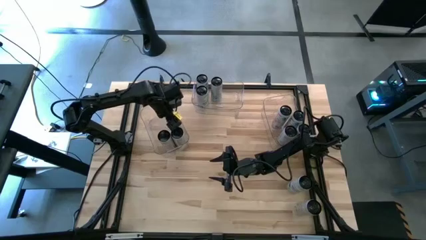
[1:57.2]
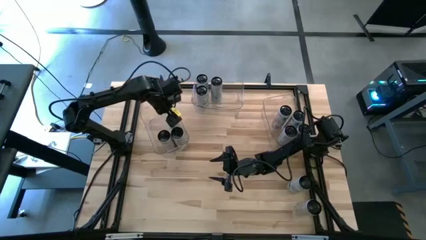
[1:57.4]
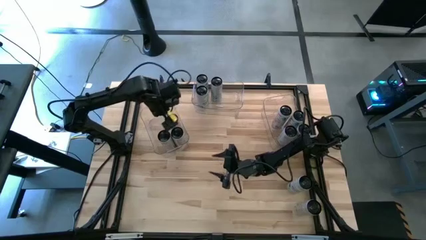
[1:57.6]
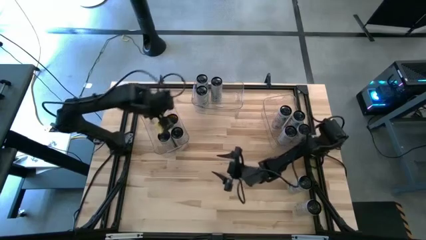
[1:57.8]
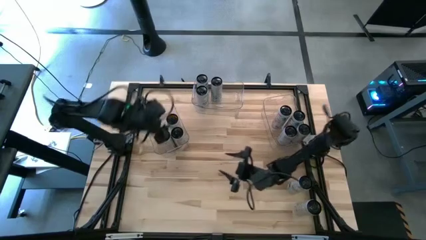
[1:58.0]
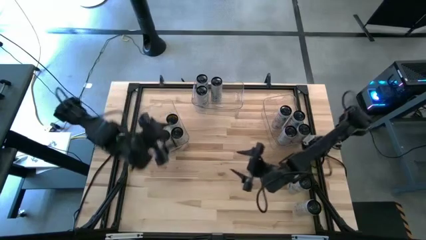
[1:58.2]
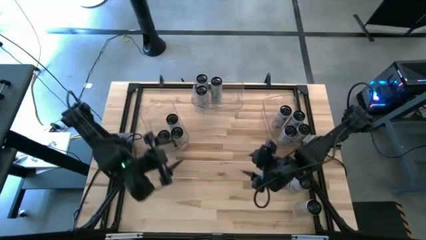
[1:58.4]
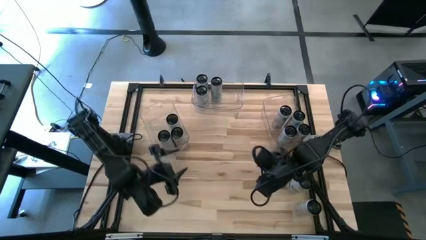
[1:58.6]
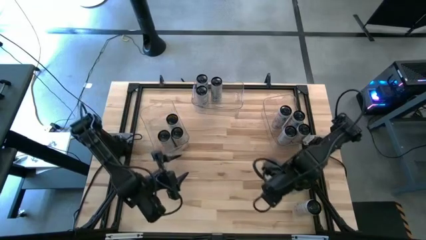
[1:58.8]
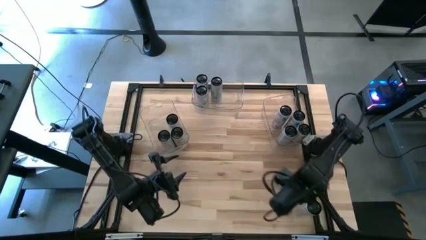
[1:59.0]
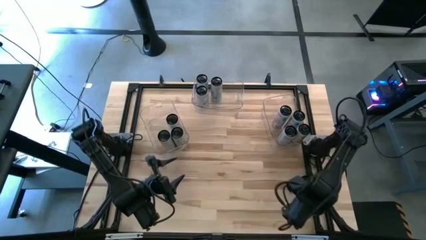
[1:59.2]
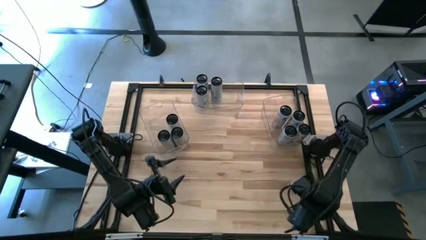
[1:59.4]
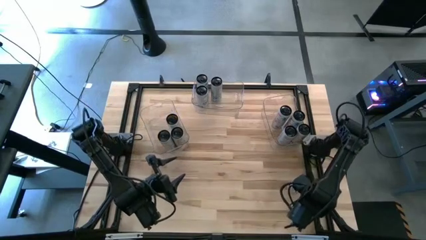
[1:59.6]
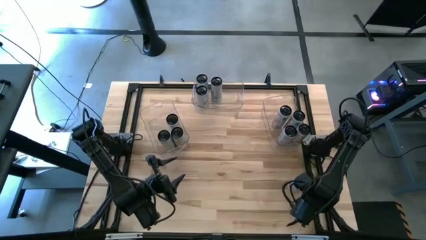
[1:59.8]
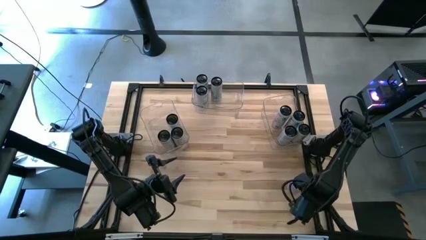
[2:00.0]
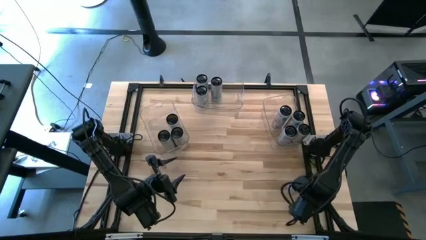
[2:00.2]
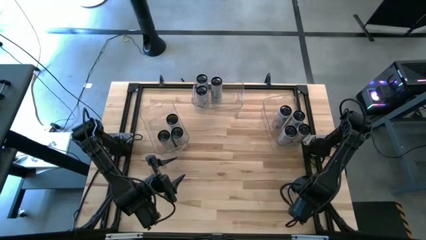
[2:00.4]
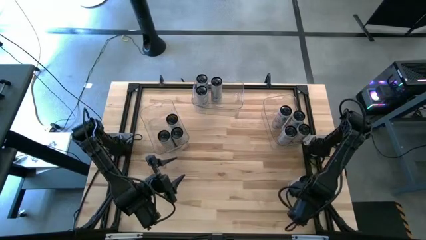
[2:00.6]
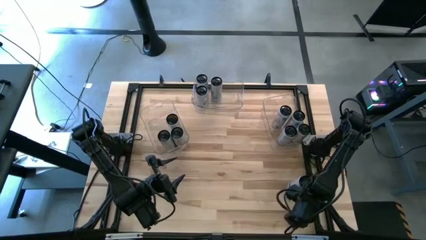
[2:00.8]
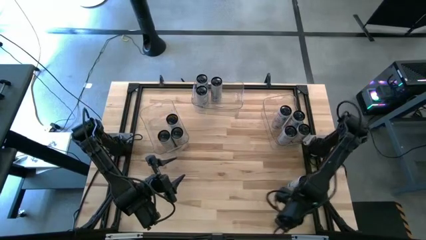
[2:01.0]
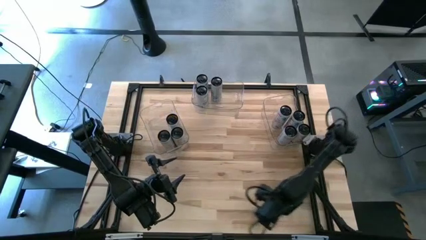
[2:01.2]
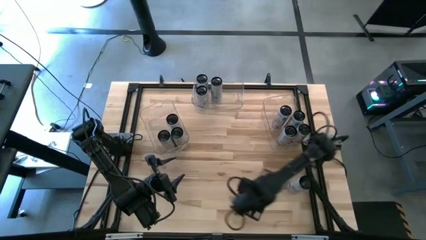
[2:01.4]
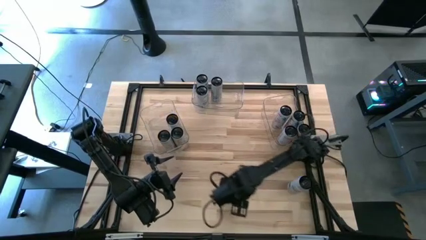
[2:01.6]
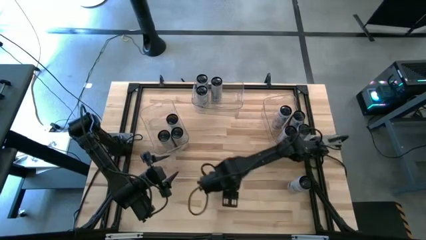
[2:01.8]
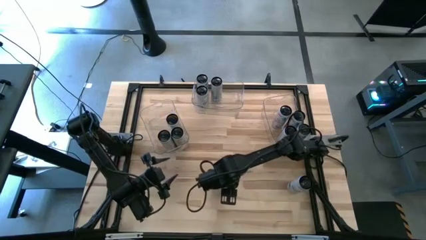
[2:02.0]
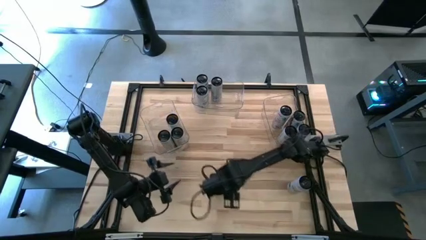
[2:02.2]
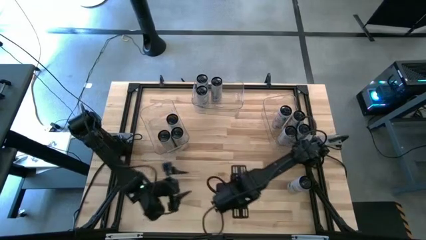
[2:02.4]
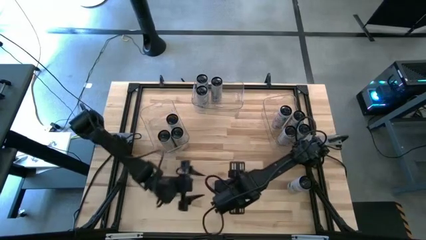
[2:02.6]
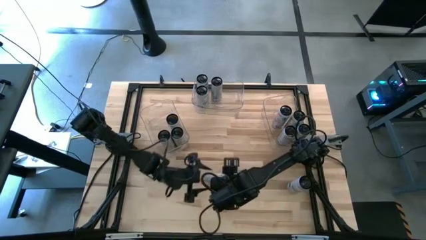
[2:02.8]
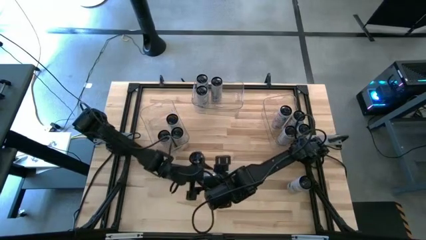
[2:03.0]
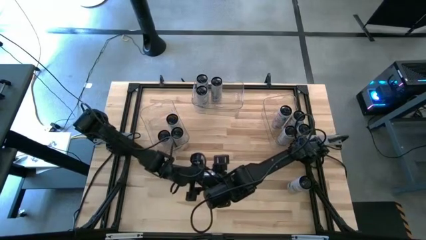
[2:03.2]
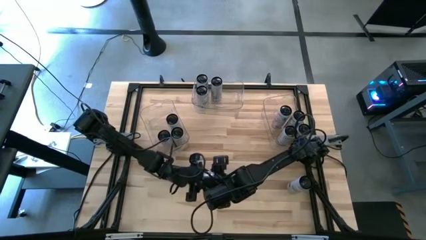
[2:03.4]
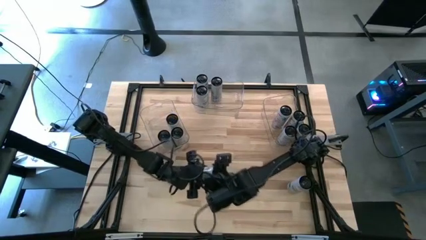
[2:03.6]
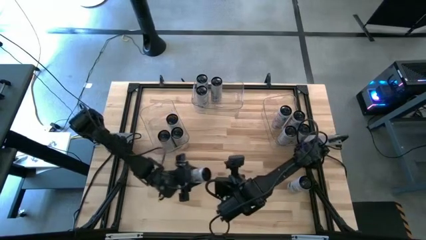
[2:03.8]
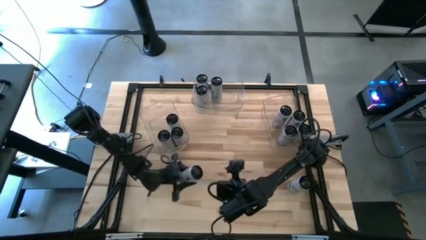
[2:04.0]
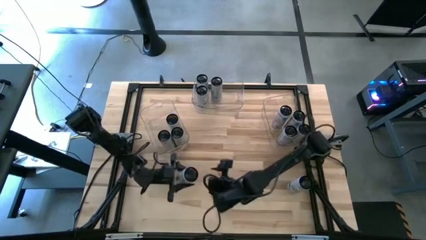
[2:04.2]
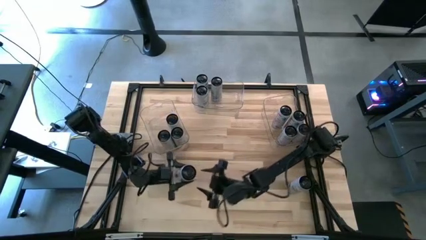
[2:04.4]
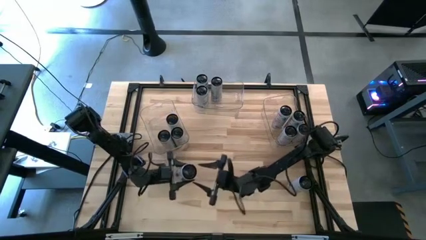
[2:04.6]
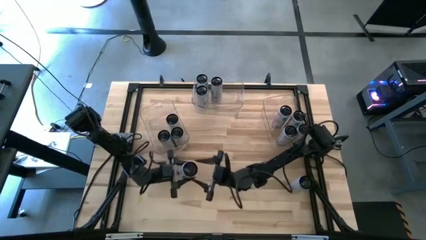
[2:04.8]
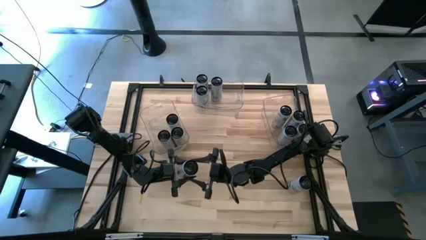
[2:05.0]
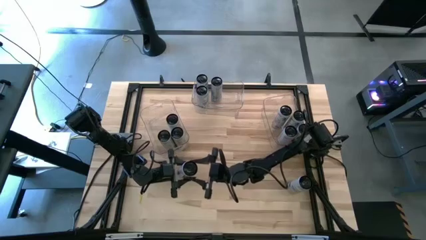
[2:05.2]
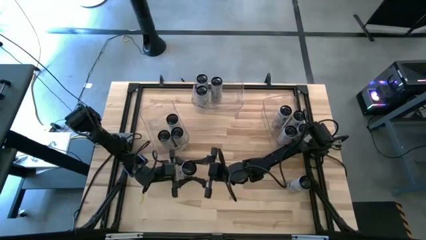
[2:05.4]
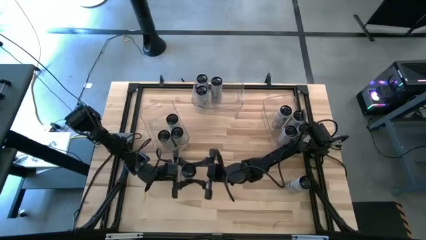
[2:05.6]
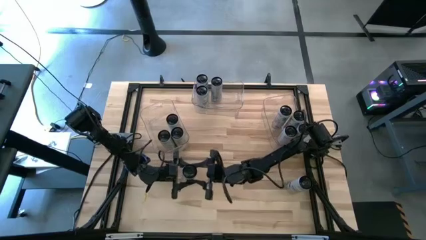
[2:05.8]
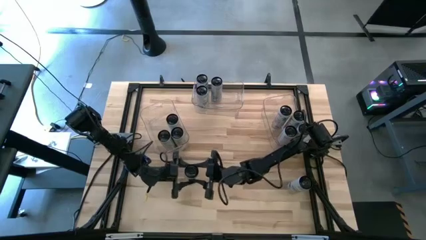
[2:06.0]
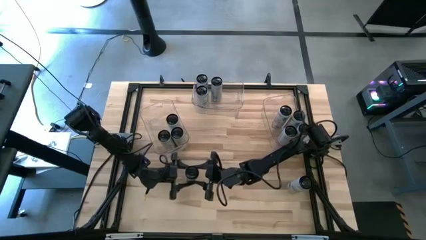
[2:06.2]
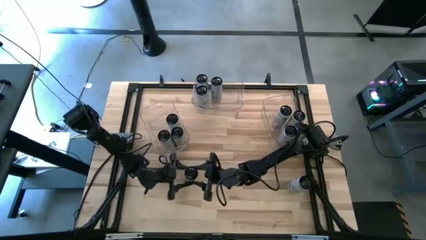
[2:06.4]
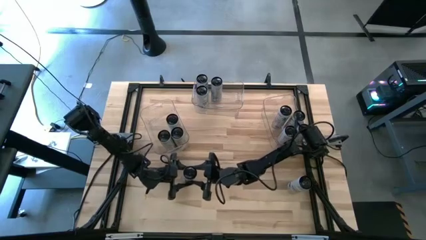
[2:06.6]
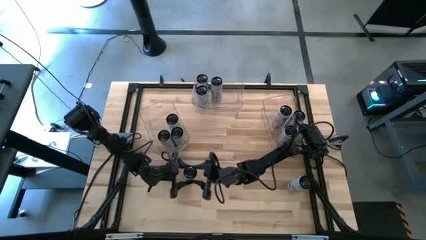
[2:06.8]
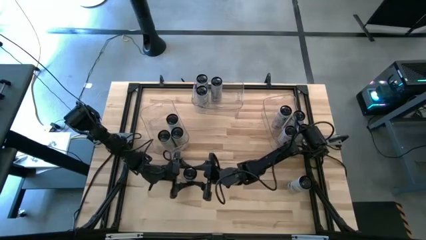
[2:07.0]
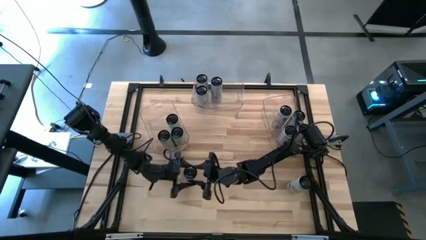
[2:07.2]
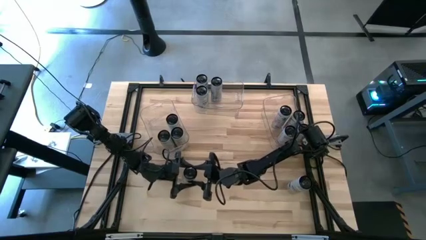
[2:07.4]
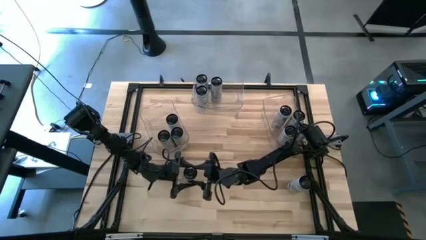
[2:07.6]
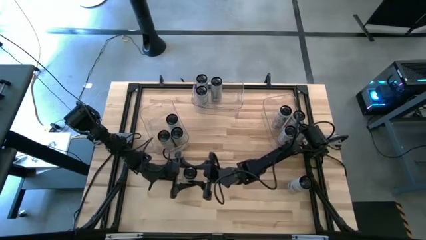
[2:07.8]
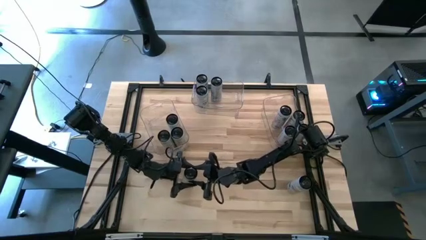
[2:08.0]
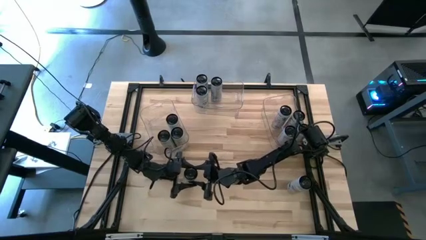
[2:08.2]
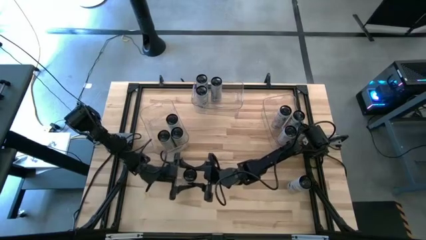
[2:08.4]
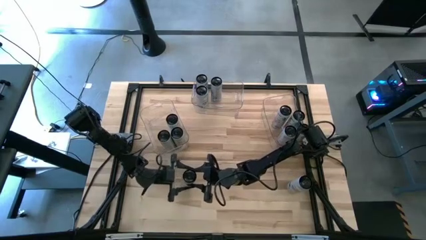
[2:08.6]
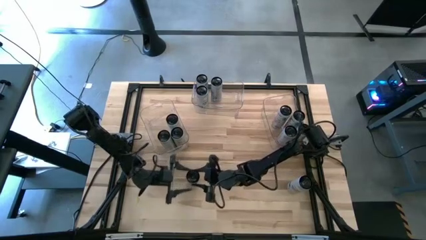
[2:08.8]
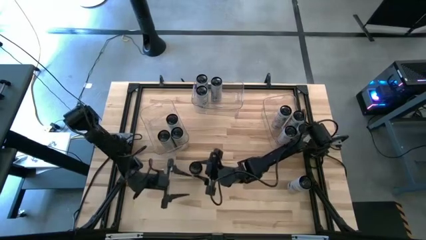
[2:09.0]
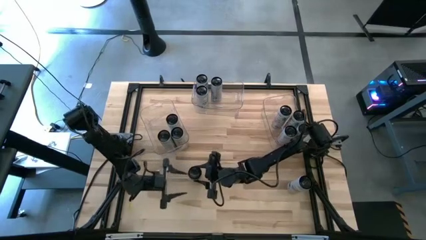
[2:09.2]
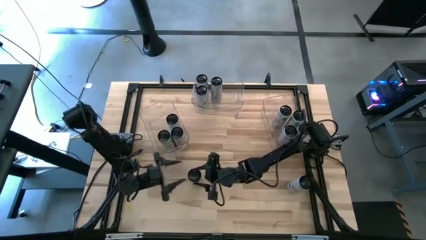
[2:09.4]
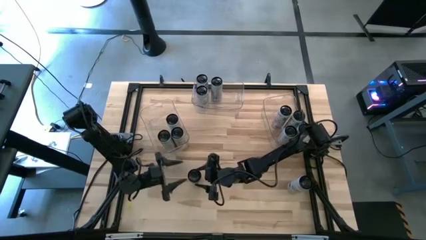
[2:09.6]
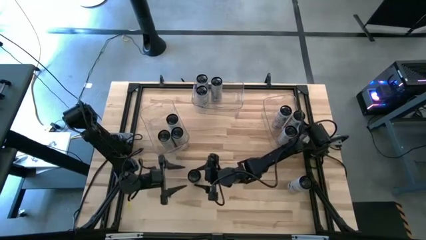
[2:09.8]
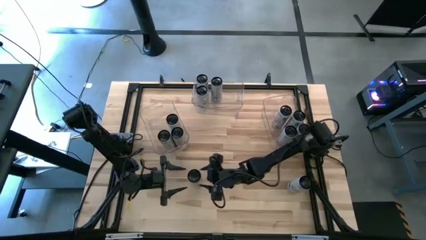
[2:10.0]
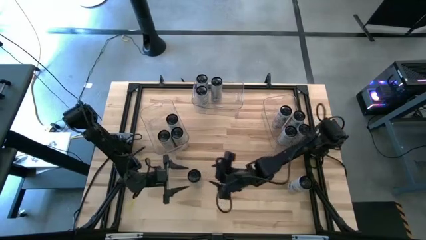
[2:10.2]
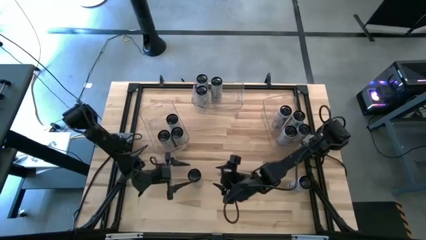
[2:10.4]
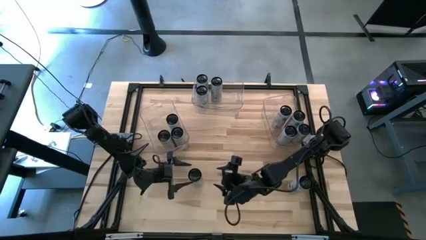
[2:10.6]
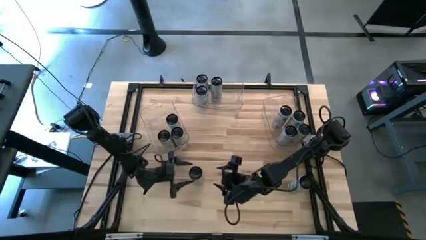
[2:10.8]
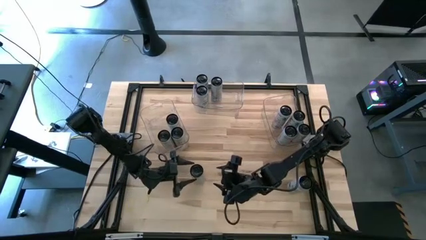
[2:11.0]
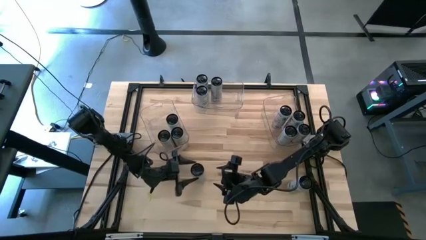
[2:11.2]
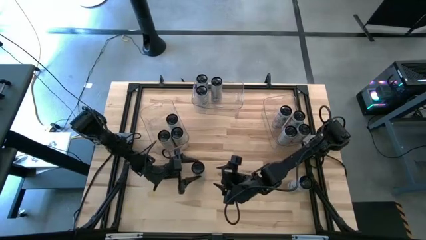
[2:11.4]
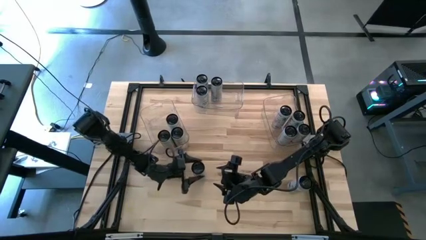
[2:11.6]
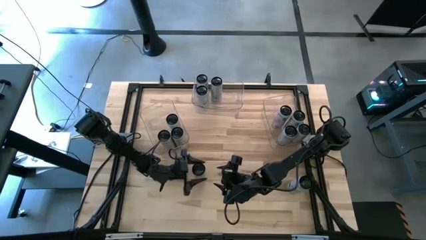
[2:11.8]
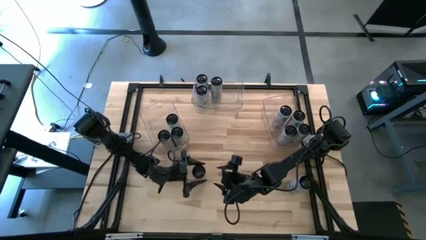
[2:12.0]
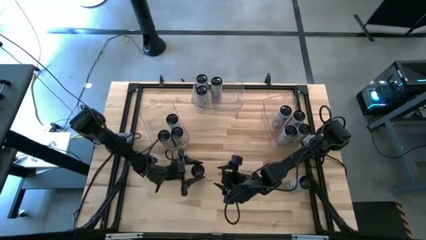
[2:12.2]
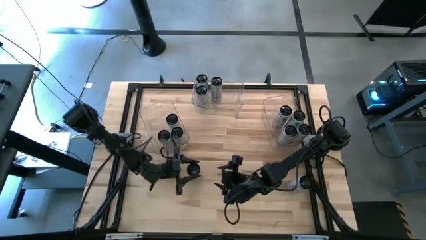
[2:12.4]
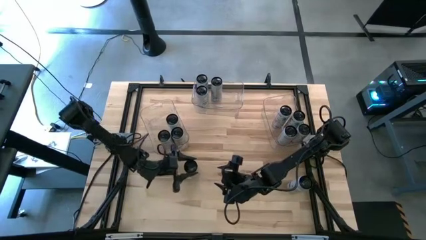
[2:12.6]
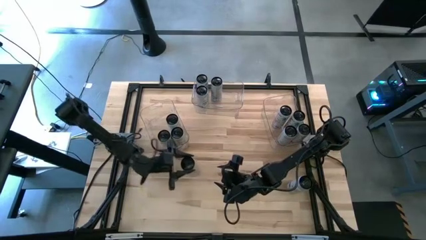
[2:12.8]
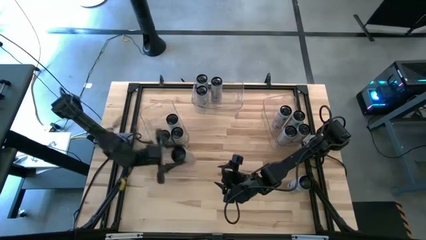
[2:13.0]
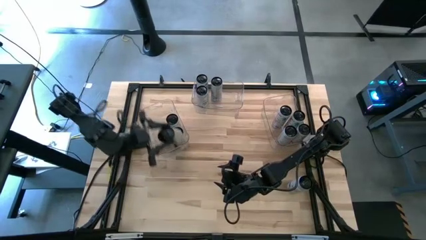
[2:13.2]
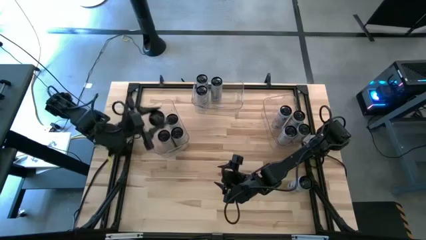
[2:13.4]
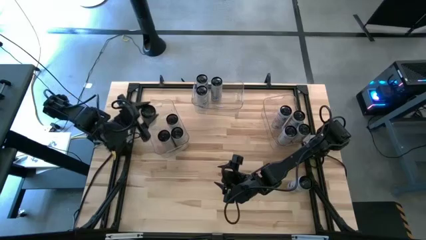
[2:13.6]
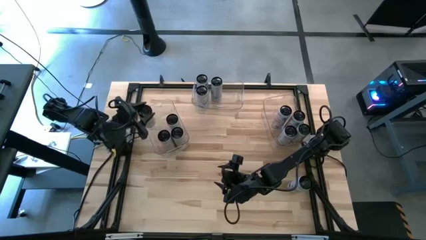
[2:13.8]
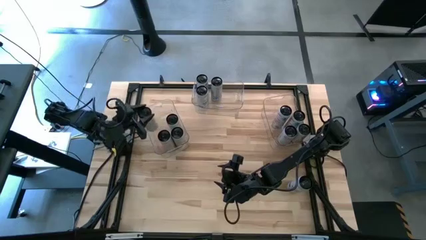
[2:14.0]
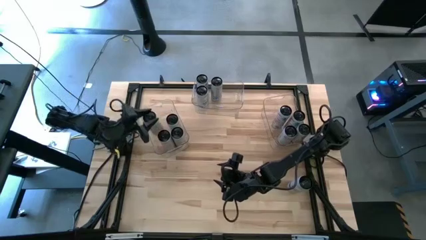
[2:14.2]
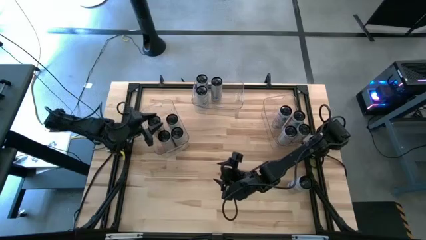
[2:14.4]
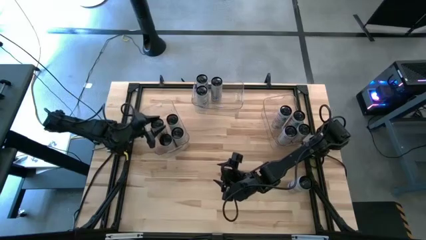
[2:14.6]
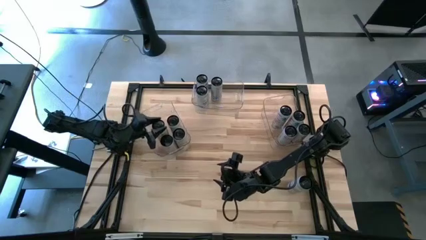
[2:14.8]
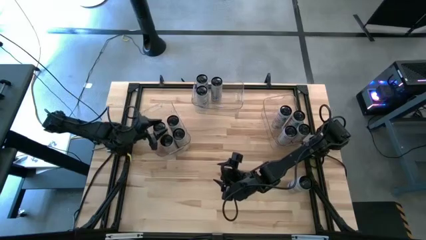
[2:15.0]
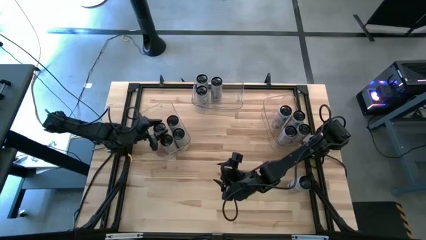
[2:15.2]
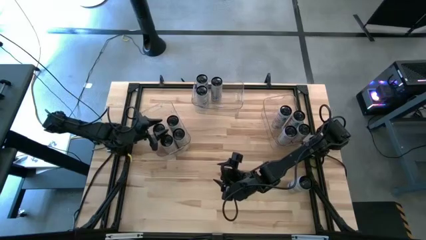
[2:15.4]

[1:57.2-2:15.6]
Task: Sort soda cans
Put the white/yellow soda can into the left transparent bin
